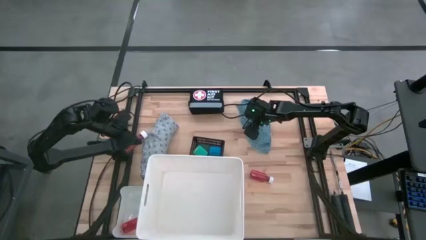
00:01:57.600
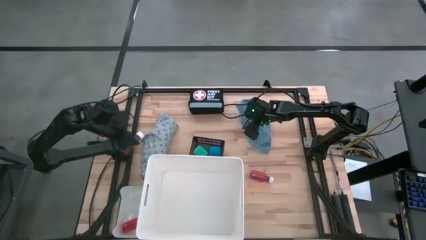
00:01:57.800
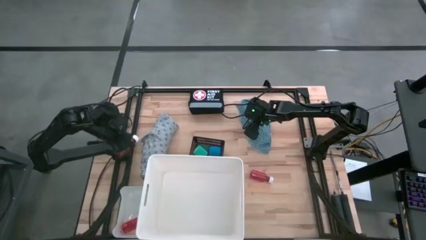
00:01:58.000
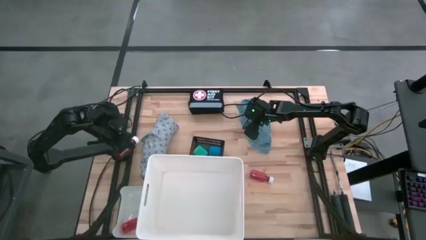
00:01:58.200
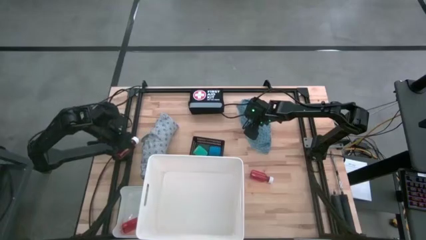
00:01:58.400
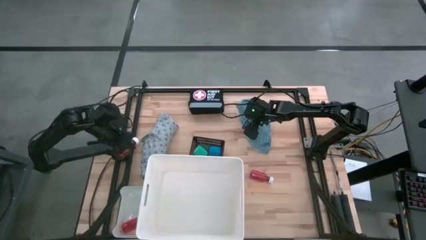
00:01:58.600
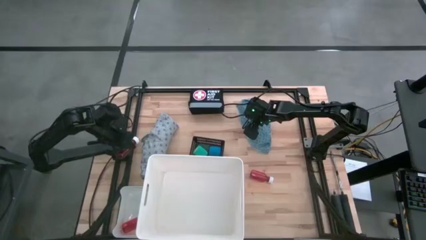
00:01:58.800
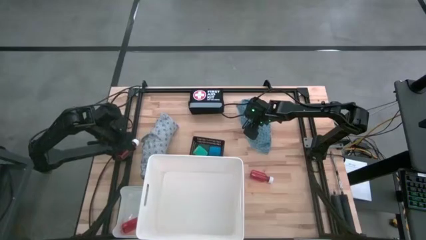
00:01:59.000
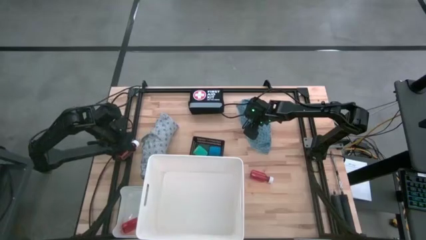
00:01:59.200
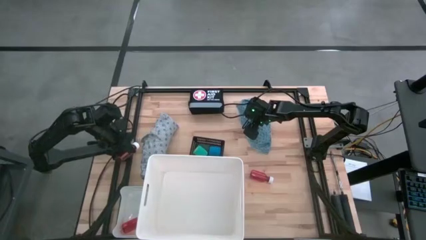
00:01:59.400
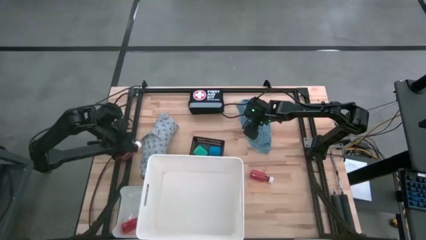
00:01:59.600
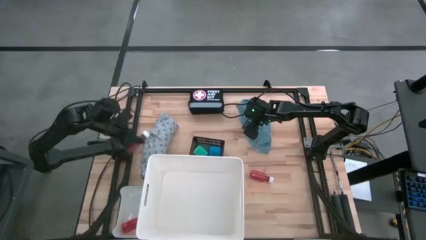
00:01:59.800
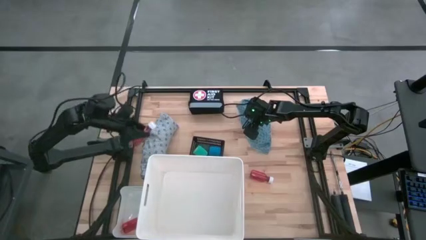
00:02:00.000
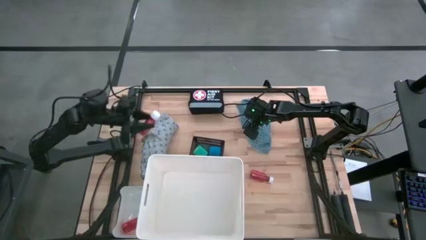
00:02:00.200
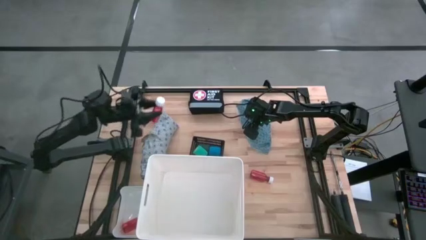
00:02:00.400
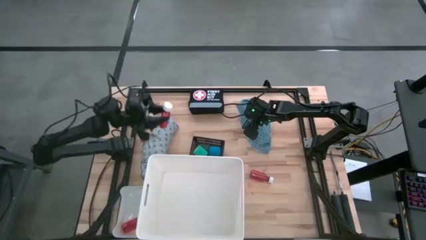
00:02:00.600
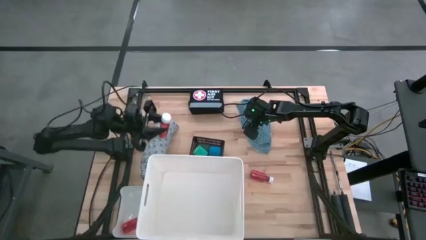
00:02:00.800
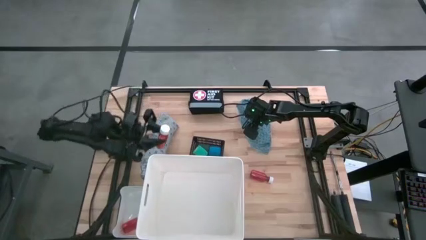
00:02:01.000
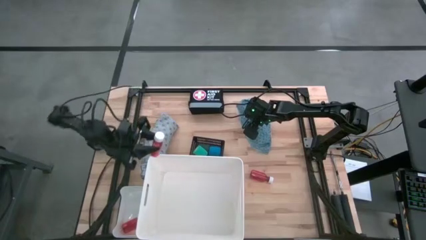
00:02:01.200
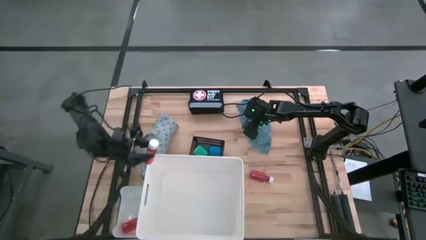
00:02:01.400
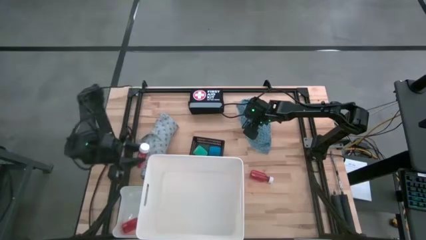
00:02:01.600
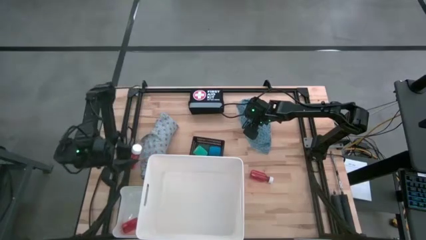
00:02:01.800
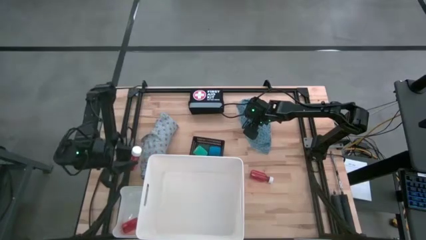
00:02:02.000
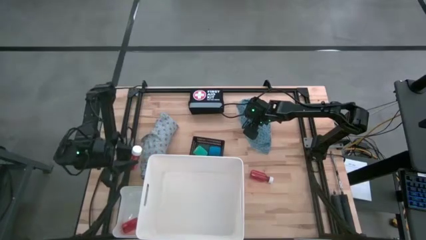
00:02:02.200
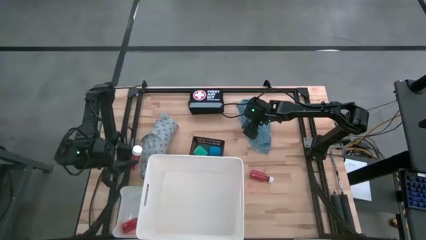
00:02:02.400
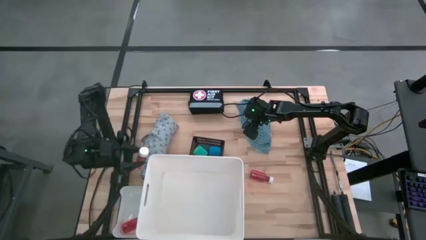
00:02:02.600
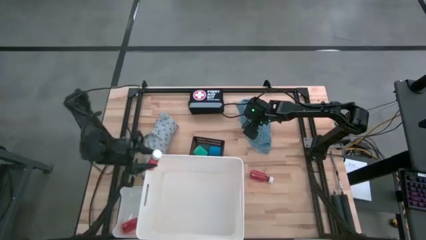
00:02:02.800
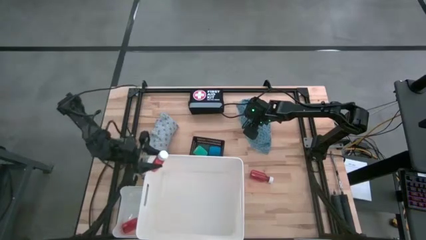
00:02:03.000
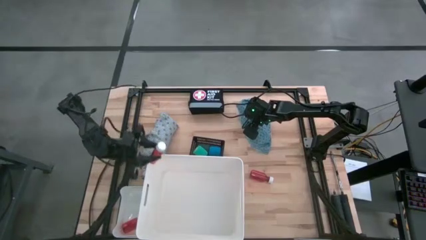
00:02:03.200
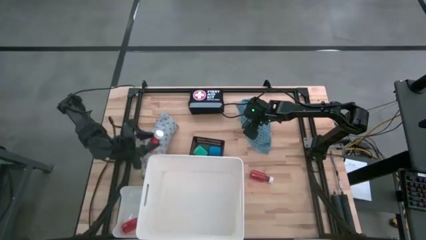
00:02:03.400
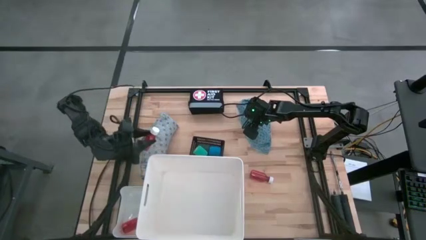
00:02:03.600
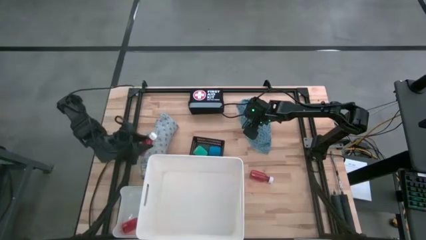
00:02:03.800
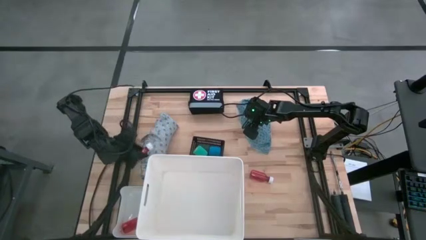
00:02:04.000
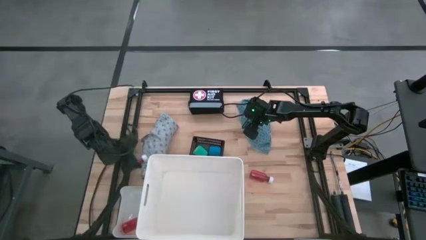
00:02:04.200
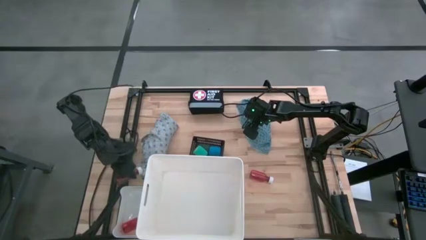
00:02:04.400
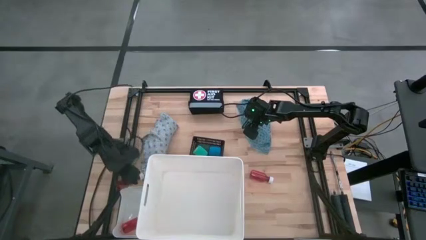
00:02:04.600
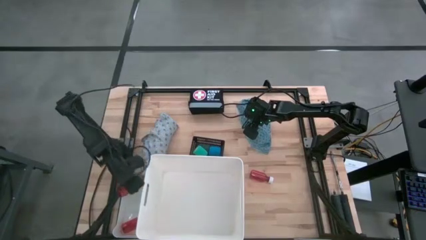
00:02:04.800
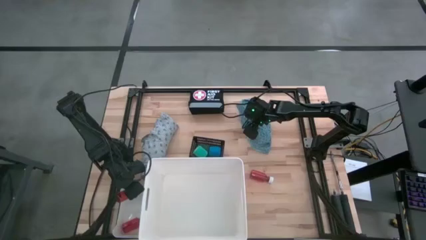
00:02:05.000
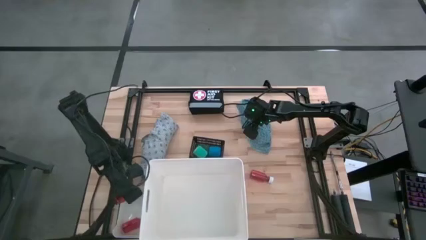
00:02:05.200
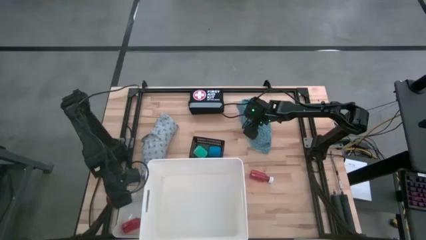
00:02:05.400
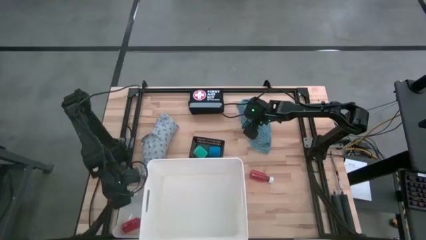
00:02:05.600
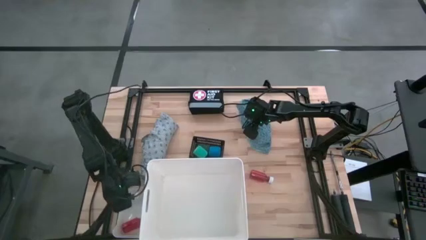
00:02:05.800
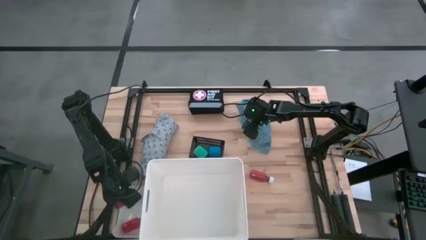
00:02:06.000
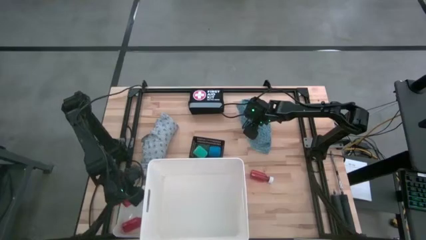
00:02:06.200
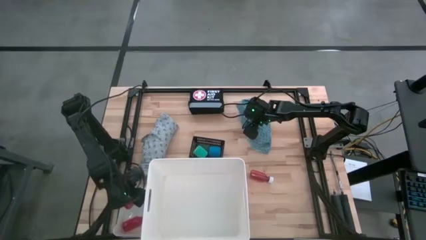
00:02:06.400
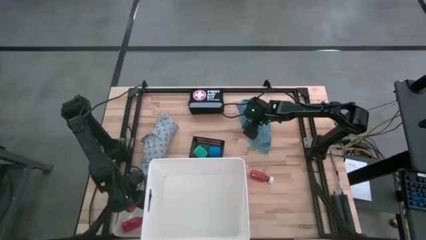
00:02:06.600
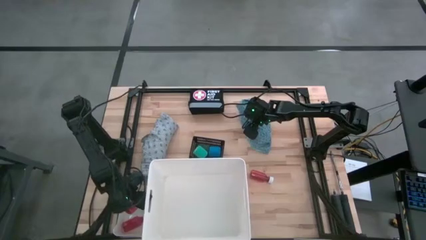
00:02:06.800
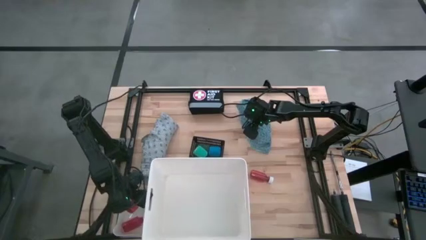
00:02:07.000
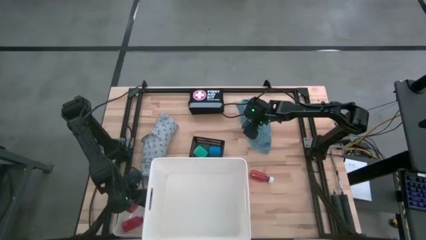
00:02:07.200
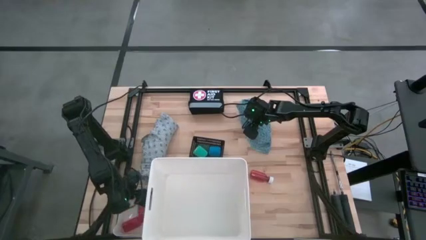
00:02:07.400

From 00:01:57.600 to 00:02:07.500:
Task: Pick & Place Medicine items
Put the right red medicine bottle into the white bin

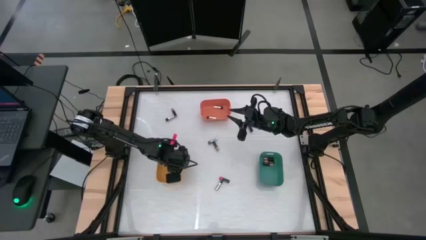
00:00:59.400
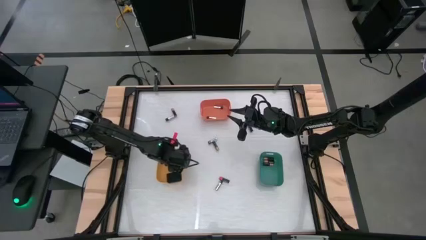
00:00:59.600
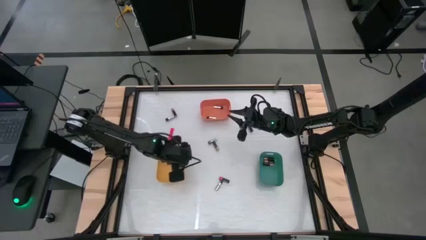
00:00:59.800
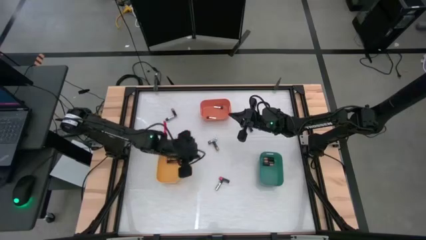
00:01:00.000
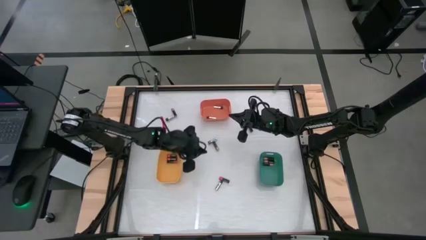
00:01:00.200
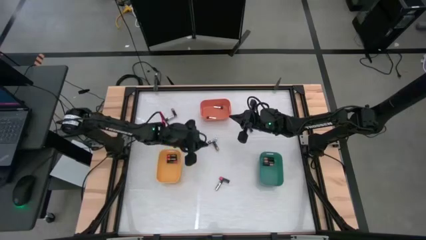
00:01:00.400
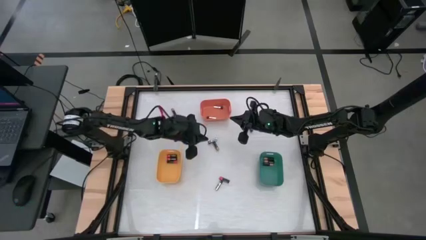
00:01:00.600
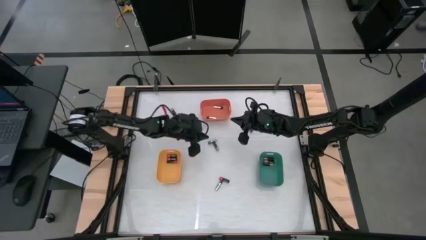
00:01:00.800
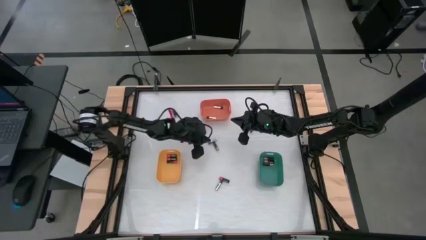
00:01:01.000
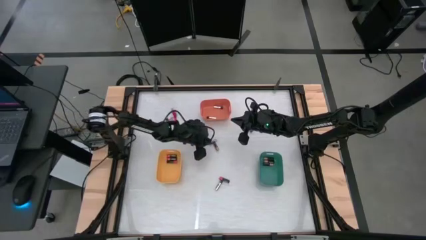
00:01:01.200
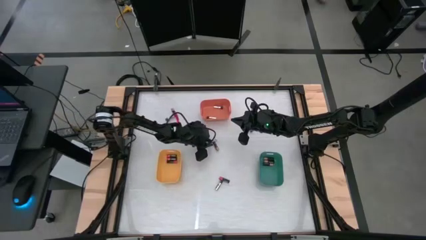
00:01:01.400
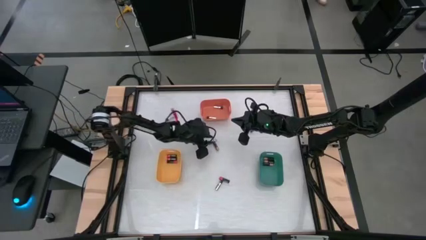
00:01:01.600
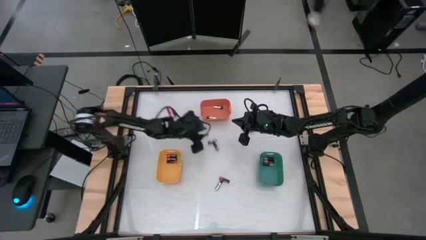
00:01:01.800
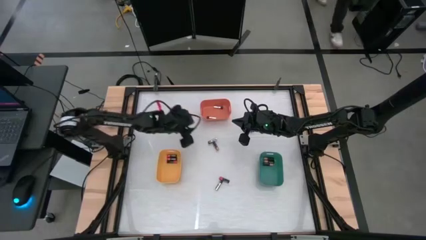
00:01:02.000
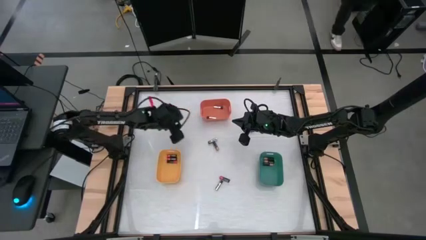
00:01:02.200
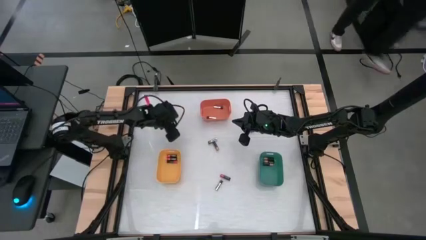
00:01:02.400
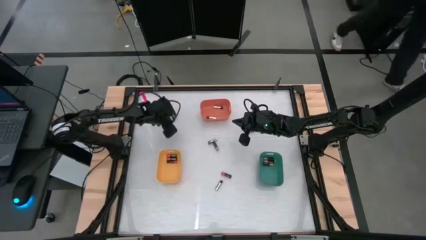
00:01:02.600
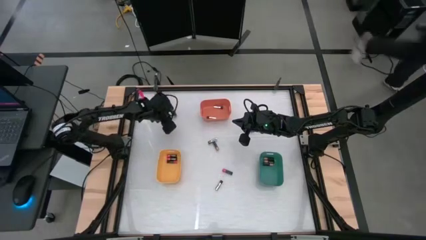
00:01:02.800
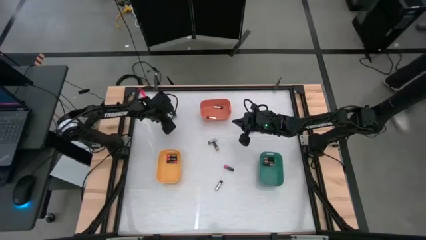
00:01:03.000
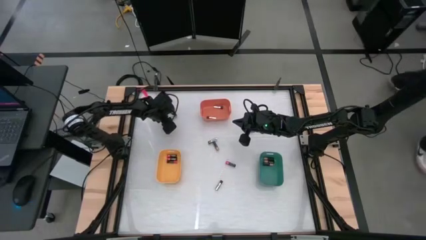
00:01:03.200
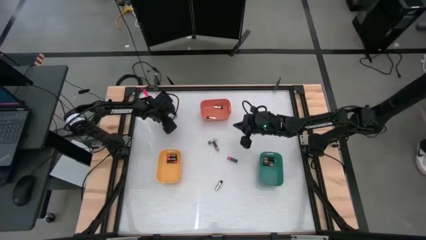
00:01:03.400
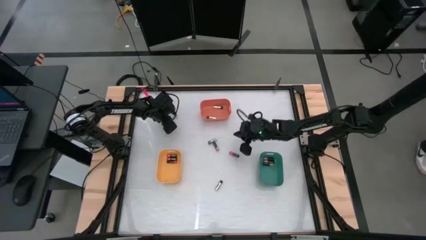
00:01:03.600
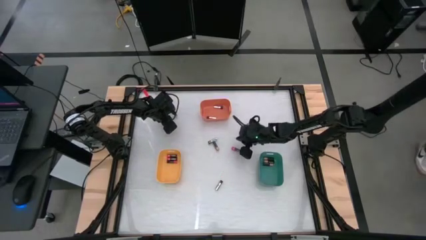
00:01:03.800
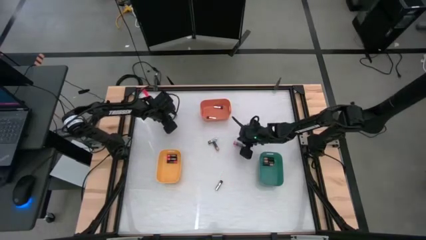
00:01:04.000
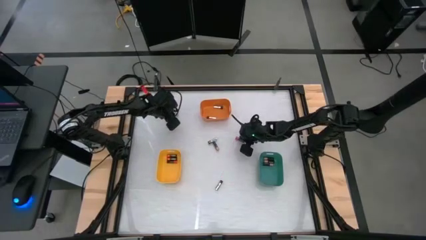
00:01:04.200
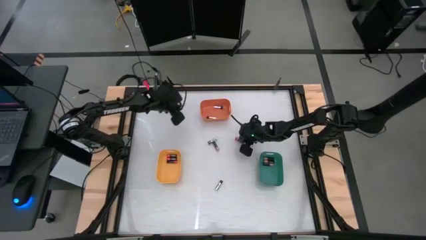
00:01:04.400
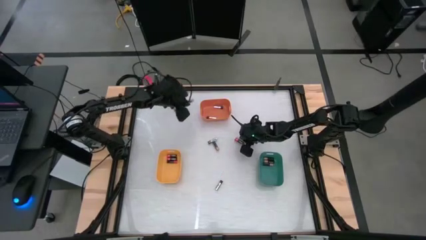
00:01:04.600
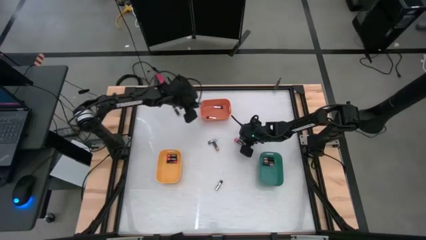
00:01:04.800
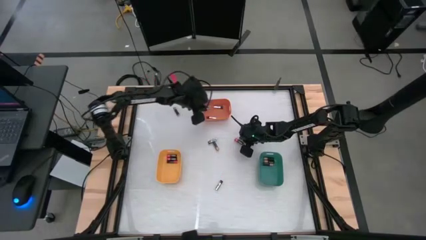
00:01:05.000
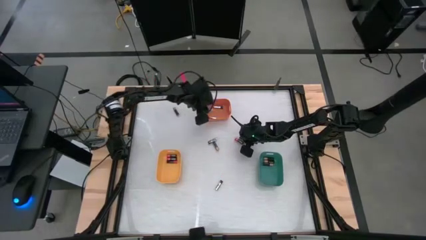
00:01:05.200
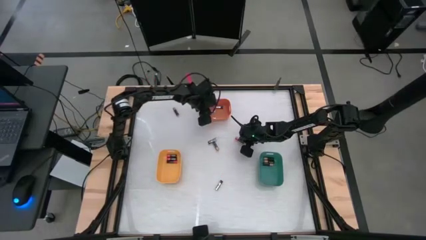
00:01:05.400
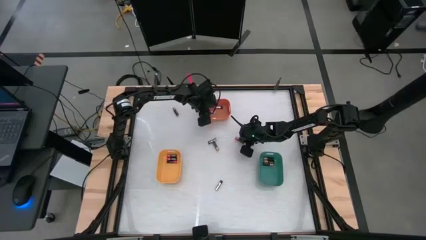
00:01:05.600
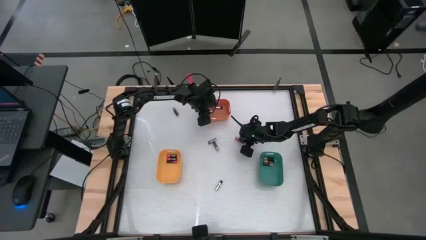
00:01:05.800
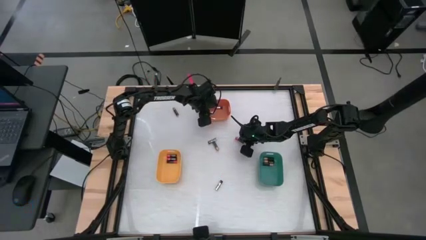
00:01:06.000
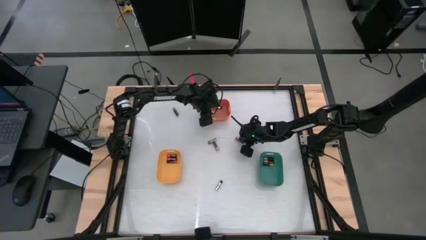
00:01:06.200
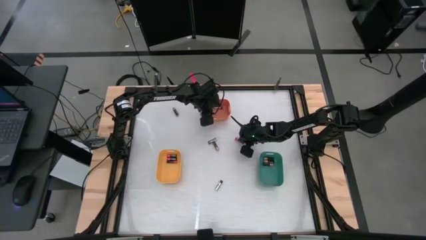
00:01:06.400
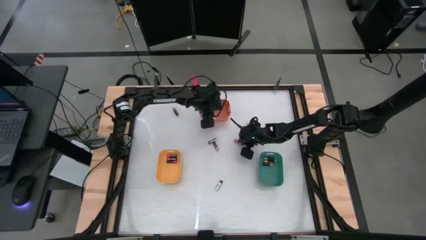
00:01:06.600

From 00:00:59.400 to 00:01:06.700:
Task: Sort batteries
Put the silver battery into the orange bin
